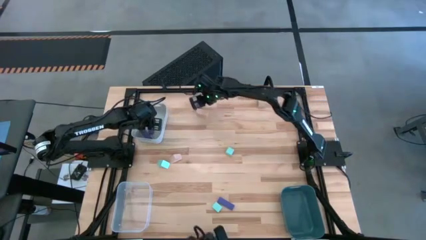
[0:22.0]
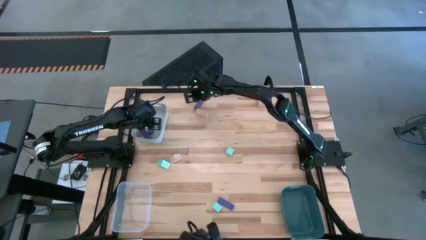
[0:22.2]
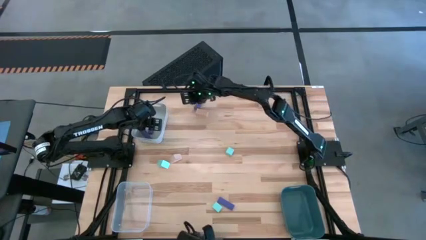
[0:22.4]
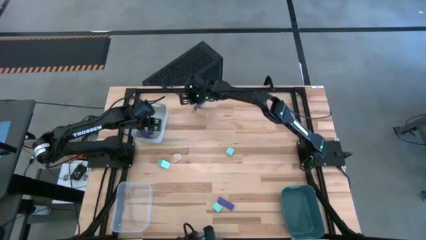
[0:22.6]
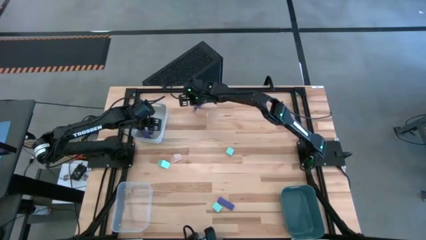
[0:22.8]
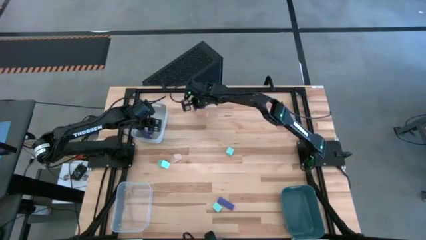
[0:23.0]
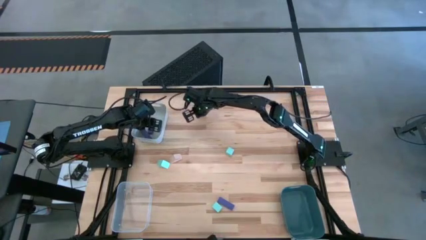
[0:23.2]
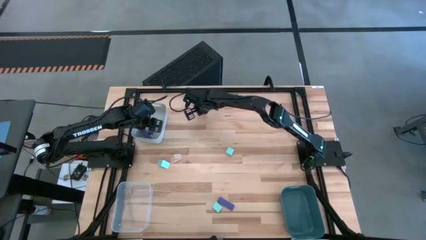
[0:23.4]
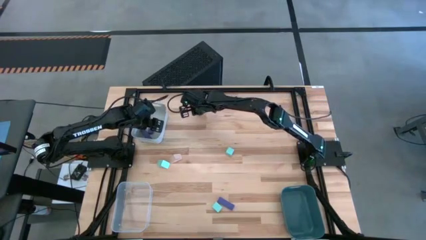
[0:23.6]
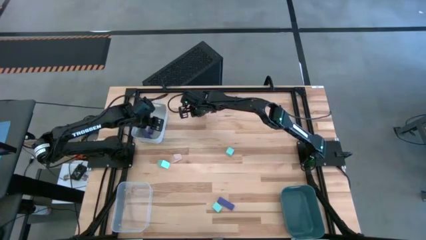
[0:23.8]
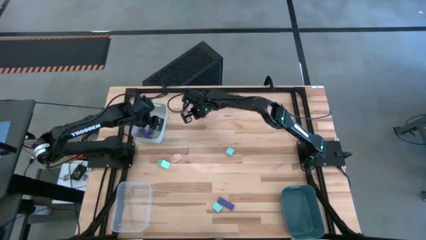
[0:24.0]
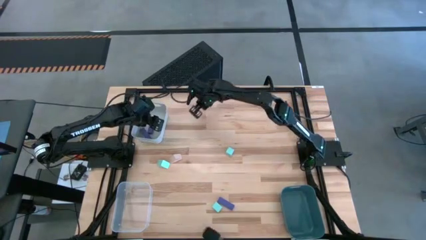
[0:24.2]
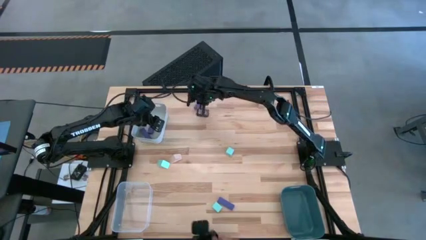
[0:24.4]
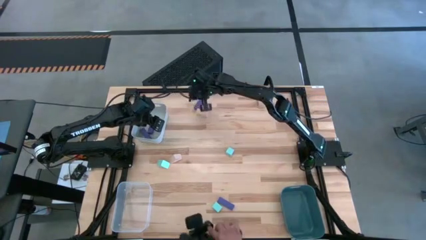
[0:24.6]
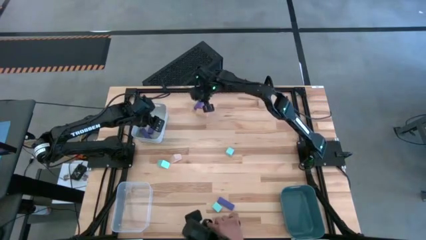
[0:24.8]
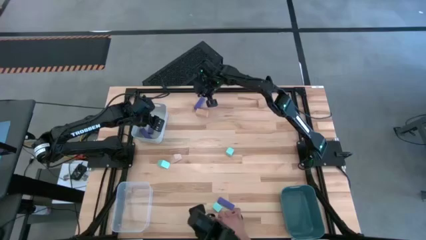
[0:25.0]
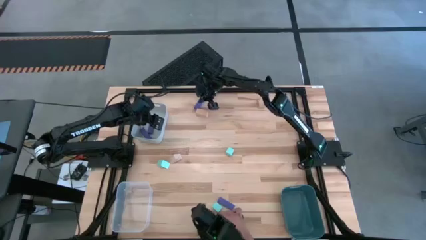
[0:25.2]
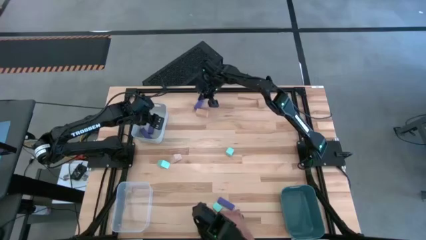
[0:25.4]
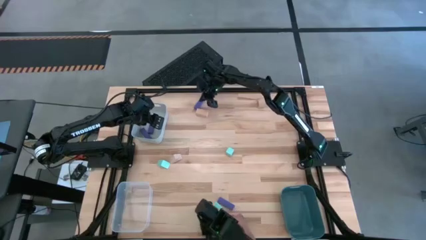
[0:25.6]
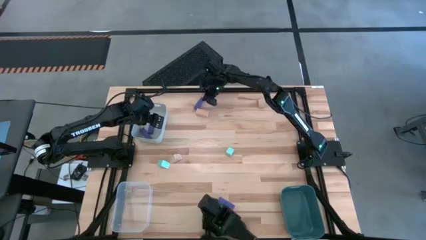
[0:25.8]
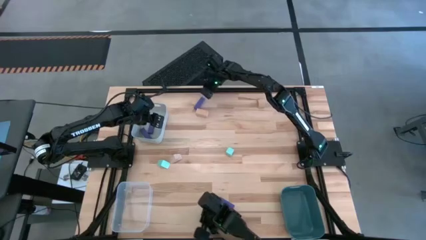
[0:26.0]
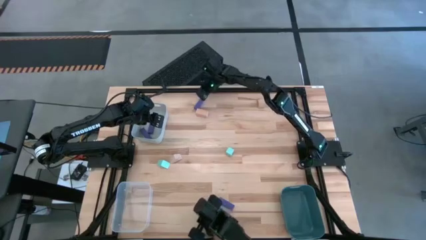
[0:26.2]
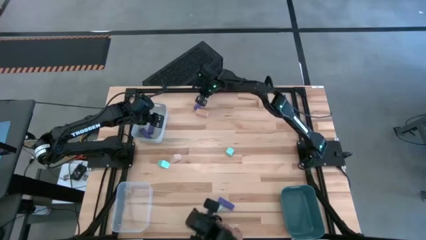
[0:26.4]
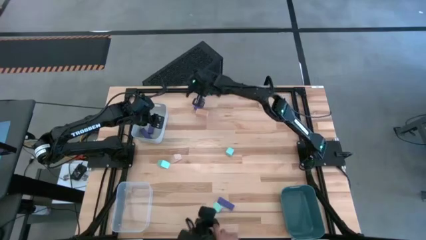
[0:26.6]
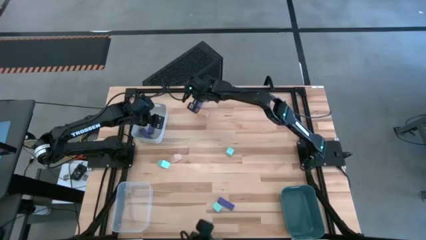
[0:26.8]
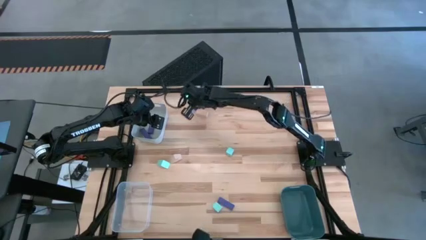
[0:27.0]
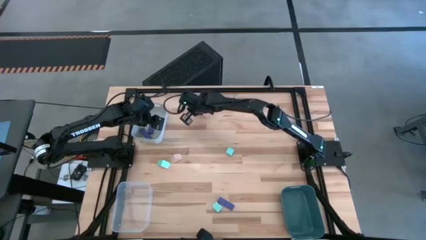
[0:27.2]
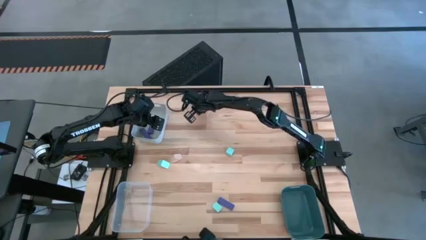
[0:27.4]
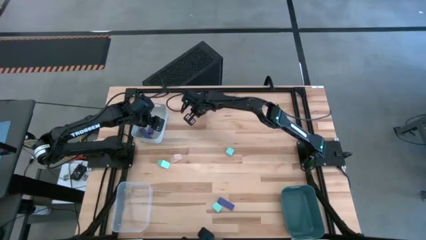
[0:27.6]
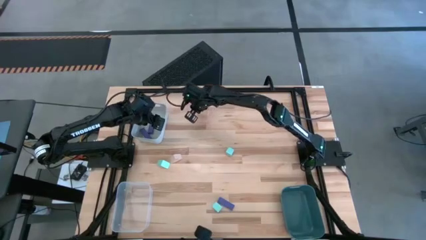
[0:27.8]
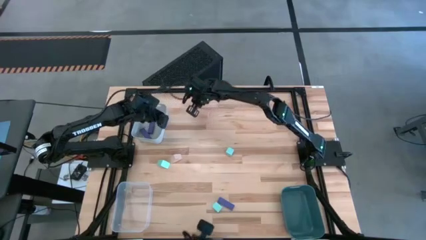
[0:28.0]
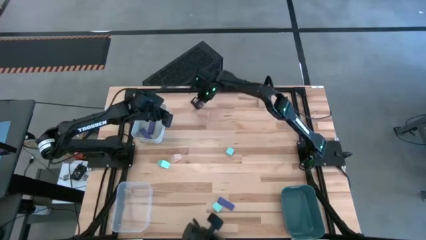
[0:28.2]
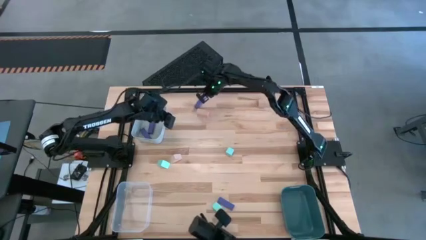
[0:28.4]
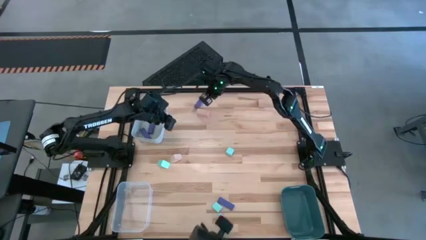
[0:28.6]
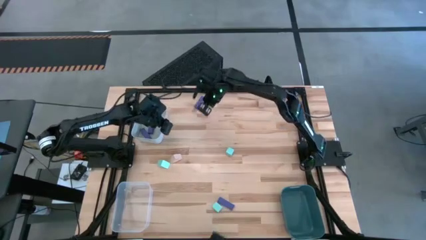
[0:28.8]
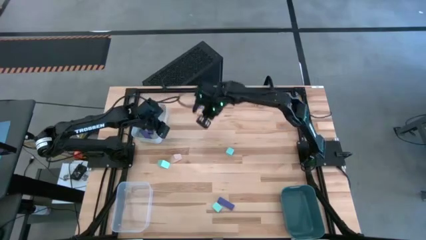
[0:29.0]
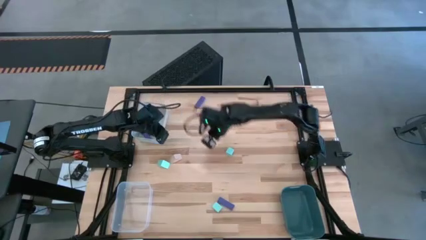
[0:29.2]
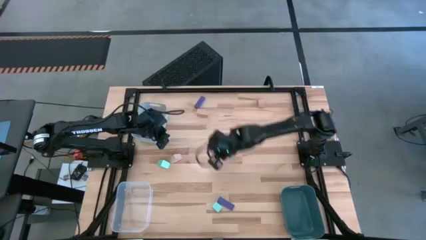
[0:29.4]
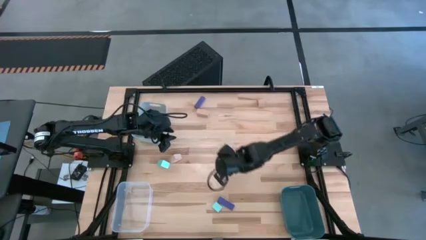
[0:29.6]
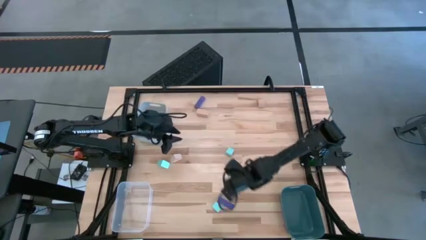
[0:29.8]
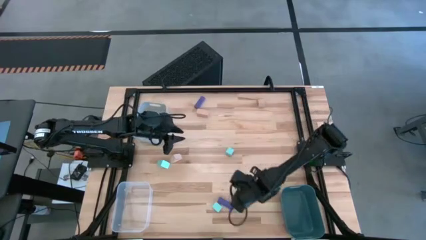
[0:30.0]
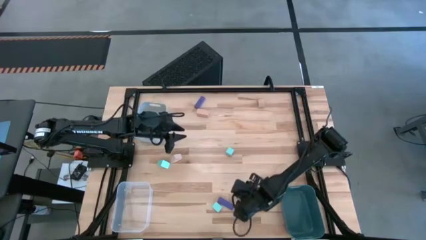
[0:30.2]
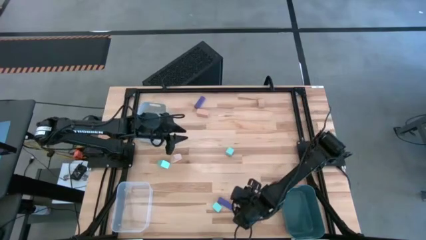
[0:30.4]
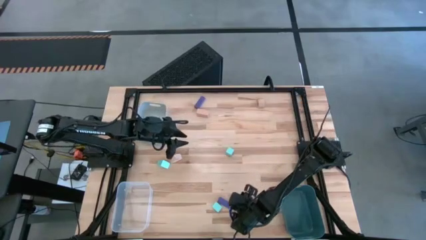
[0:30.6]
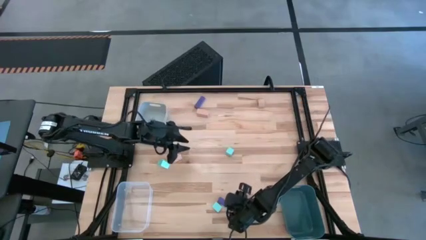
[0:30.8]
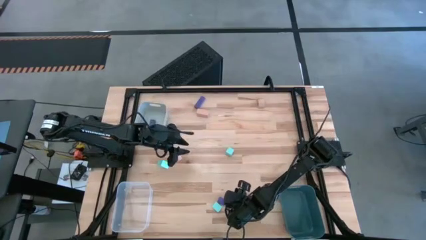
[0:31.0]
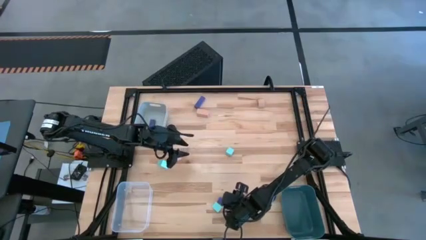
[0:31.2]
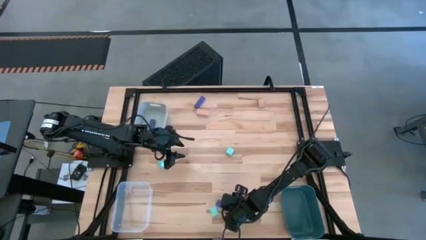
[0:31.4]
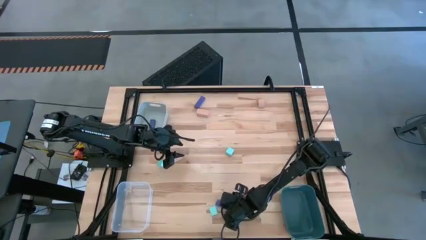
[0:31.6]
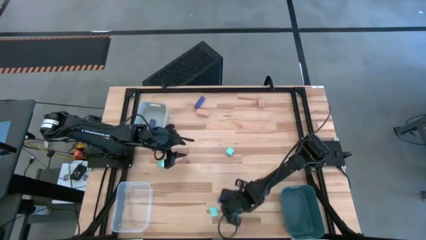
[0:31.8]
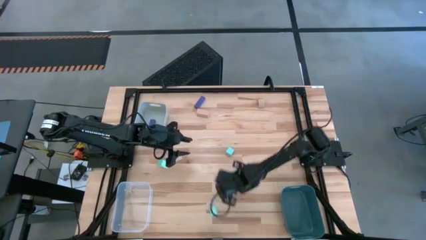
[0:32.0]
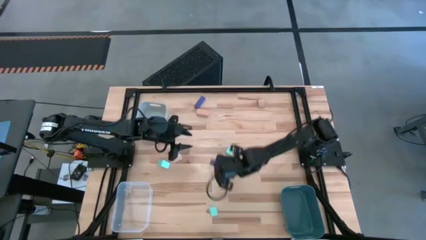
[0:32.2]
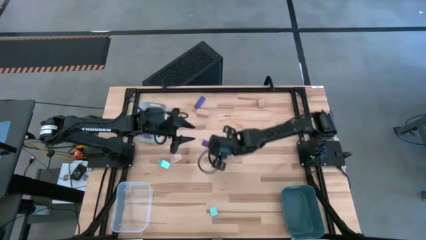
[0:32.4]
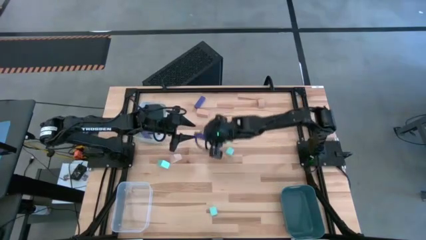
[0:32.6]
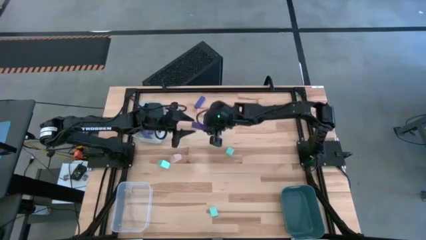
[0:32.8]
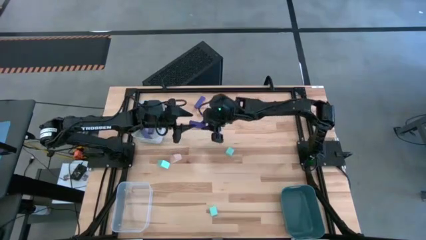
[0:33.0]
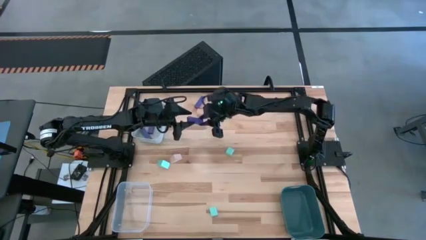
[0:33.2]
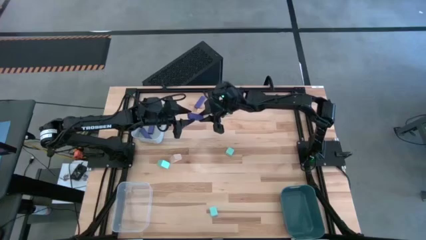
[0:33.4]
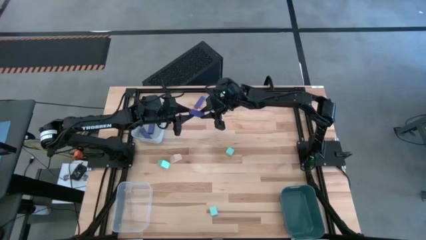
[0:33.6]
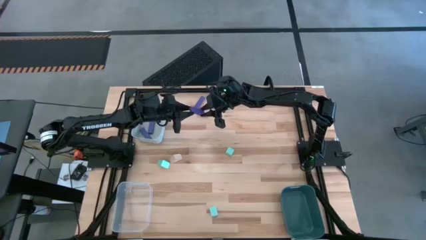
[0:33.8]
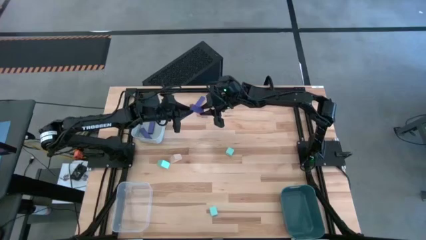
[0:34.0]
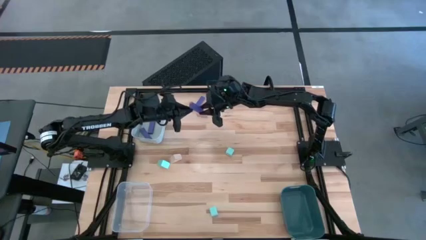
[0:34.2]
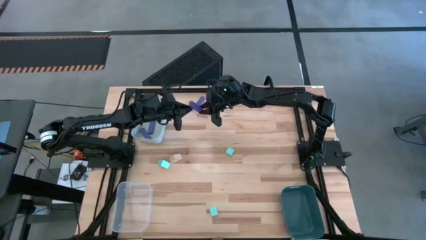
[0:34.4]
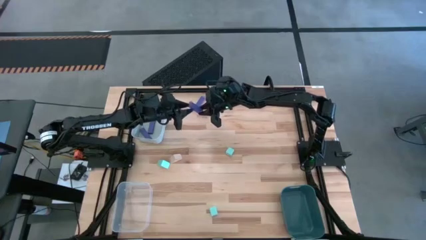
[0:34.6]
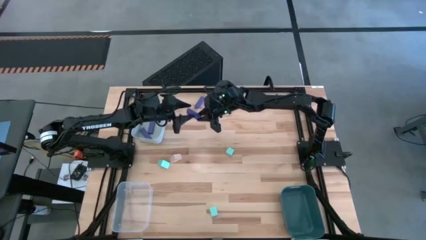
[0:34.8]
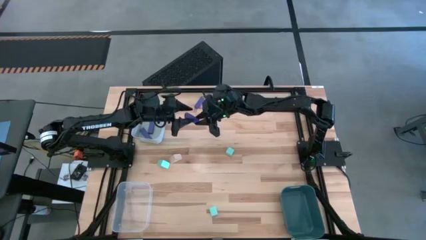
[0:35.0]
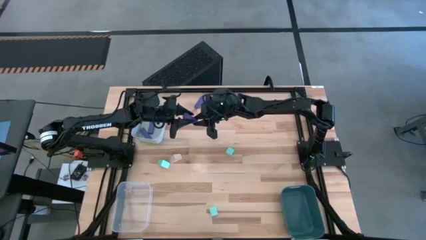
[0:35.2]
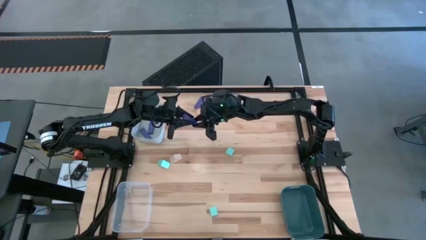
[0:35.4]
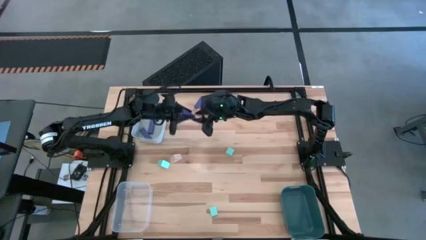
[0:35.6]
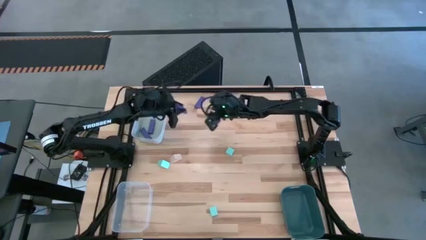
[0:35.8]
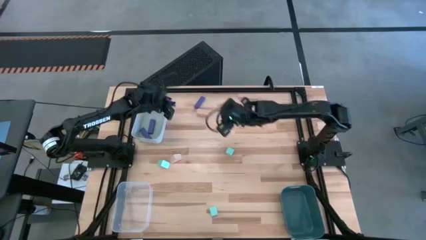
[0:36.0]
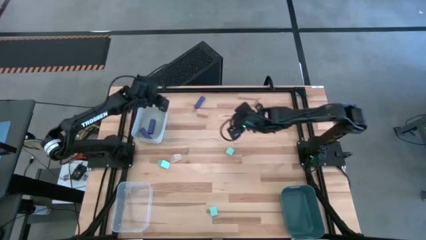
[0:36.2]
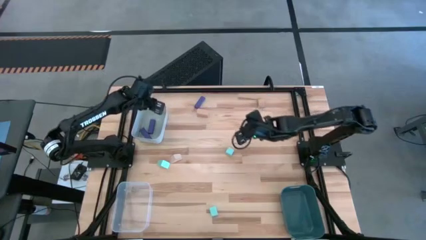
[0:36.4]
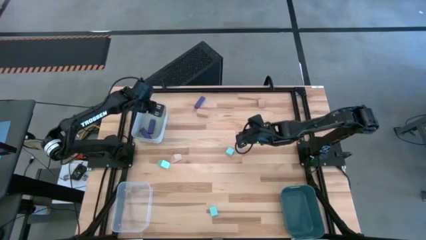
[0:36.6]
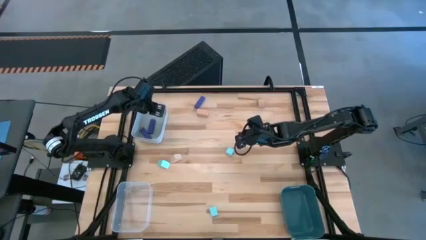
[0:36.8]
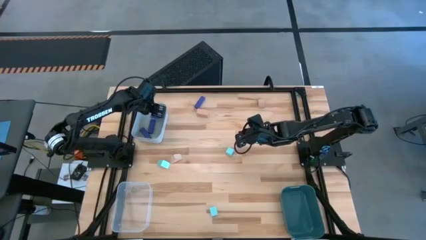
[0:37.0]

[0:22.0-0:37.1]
Task: Sort & place blocks by color
Put the purple block into the gray bin

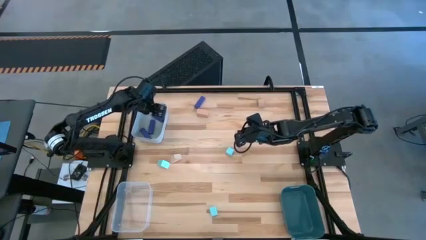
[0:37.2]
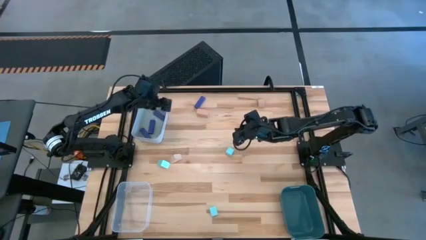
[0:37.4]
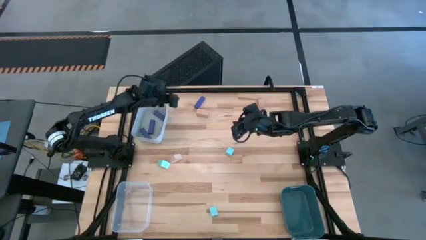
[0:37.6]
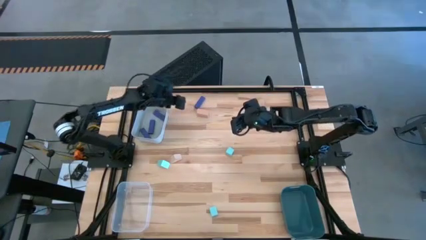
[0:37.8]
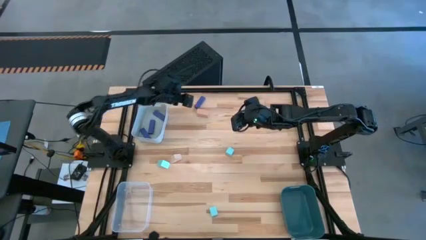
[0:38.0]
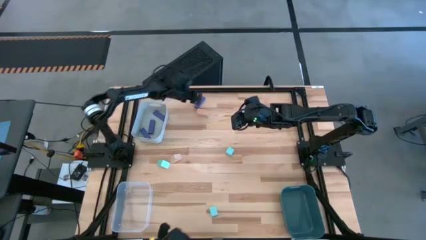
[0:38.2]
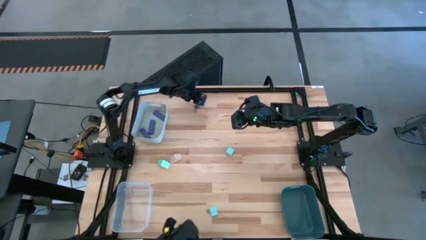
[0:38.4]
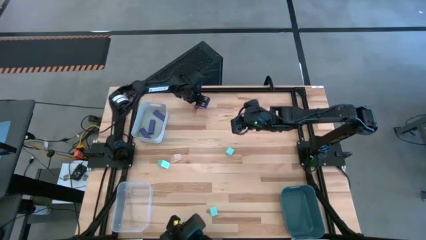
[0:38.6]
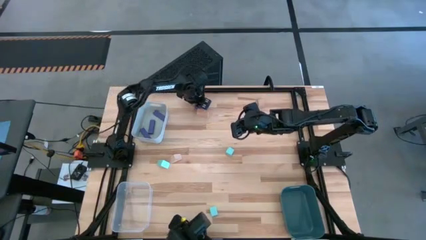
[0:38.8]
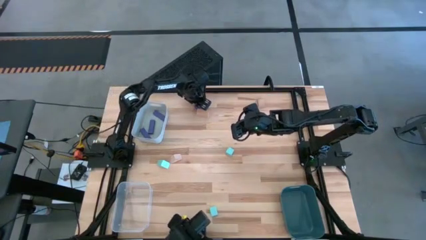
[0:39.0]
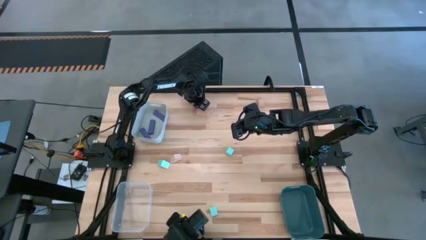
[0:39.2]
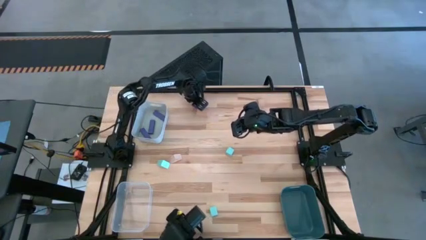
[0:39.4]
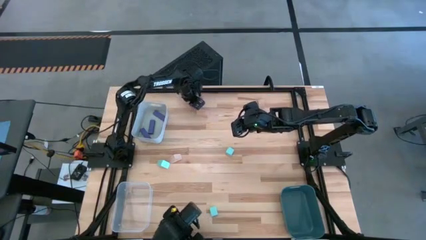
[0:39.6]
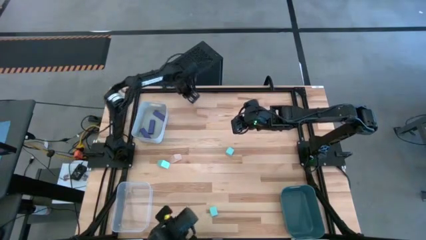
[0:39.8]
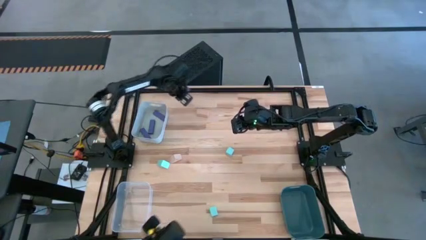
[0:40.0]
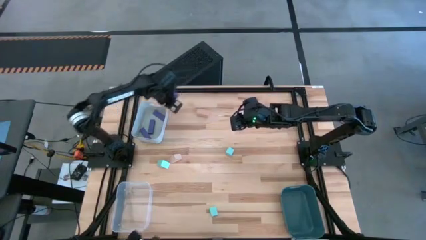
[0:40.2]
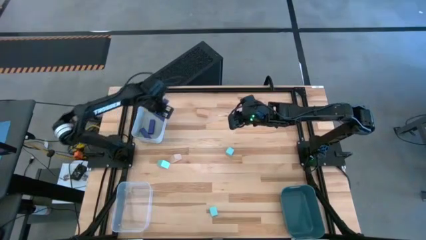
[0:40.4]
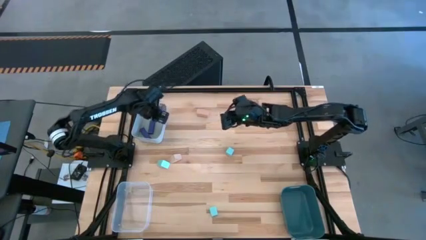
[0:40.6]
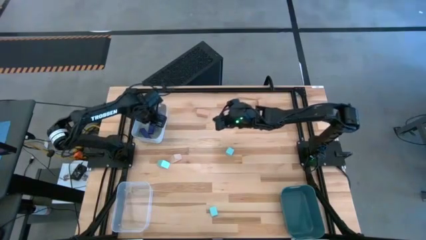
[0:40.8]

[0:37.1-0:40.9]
Put the purple block into the gray bin
